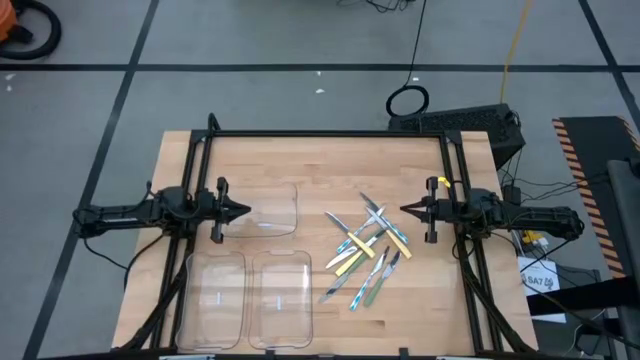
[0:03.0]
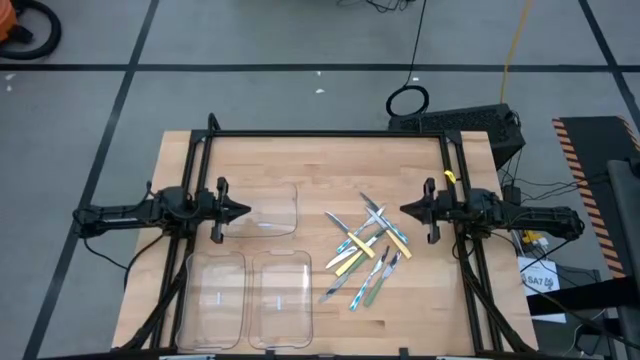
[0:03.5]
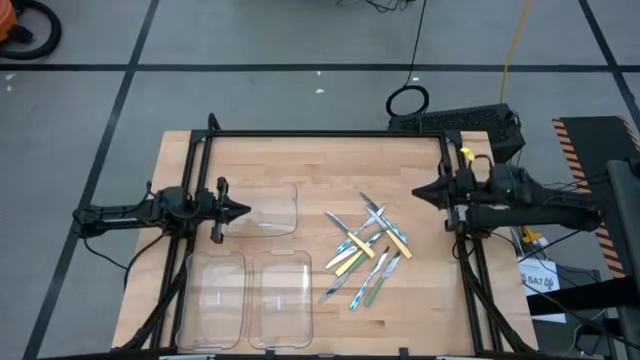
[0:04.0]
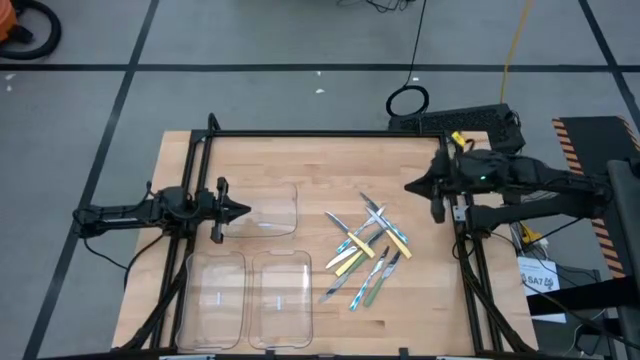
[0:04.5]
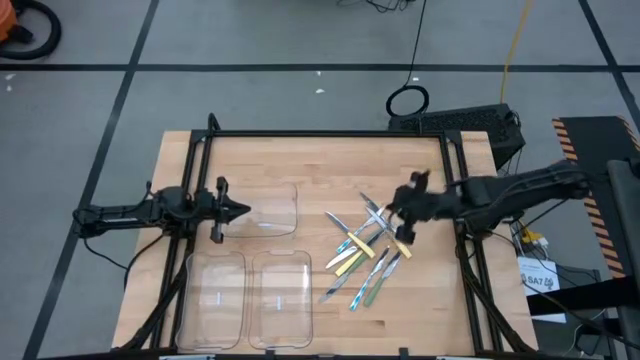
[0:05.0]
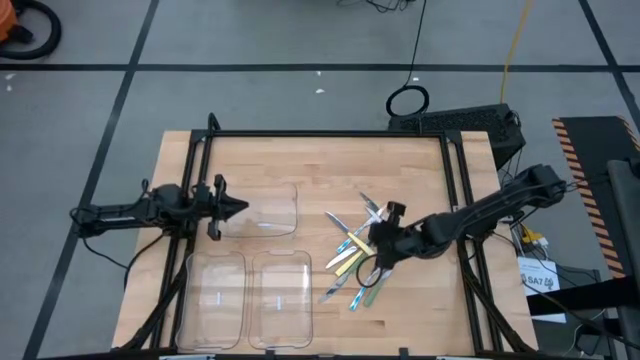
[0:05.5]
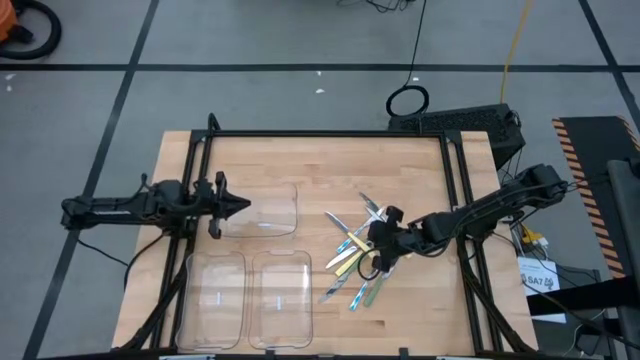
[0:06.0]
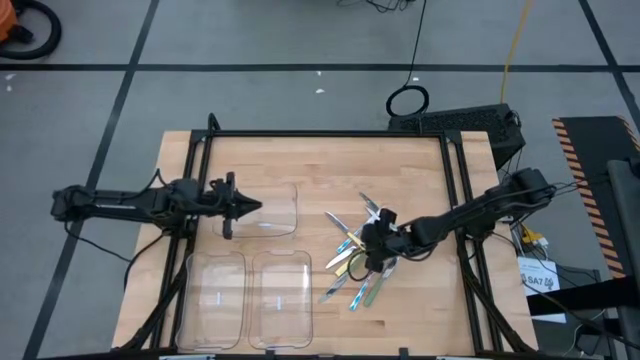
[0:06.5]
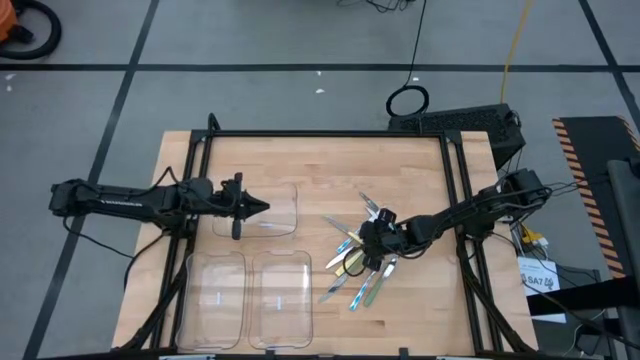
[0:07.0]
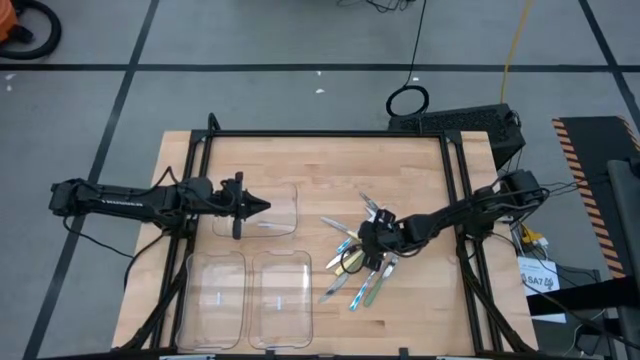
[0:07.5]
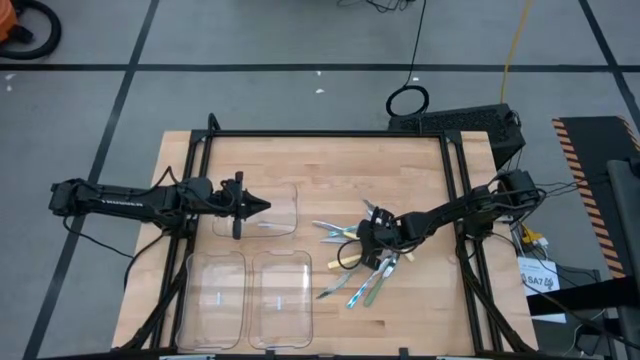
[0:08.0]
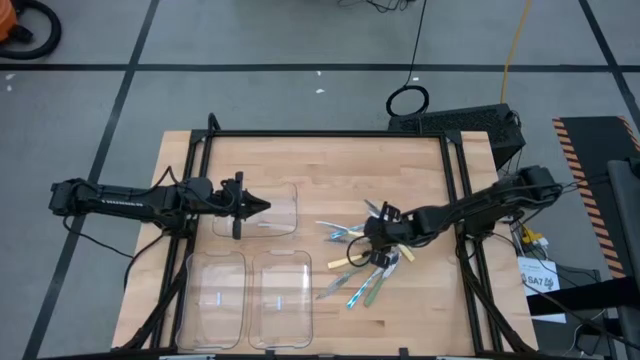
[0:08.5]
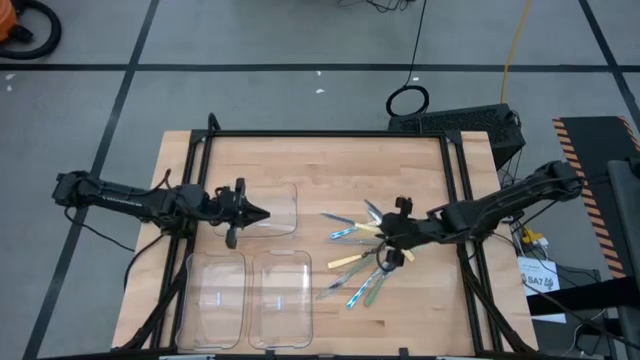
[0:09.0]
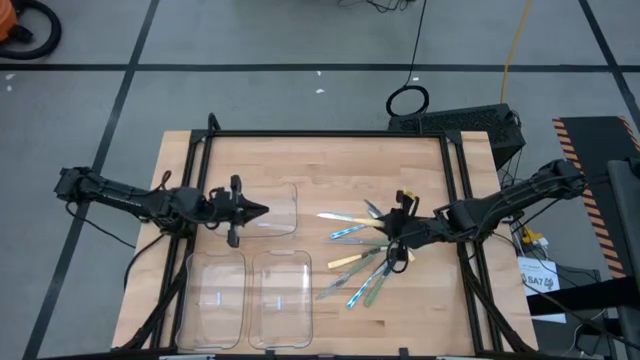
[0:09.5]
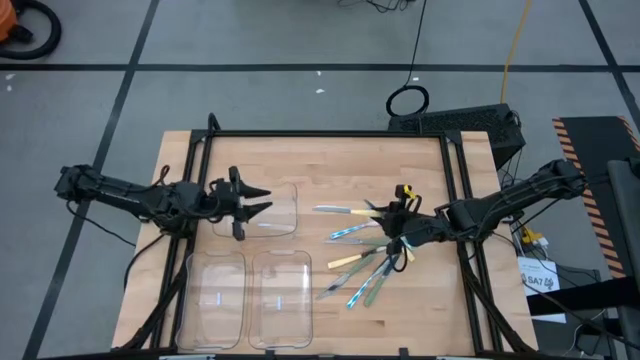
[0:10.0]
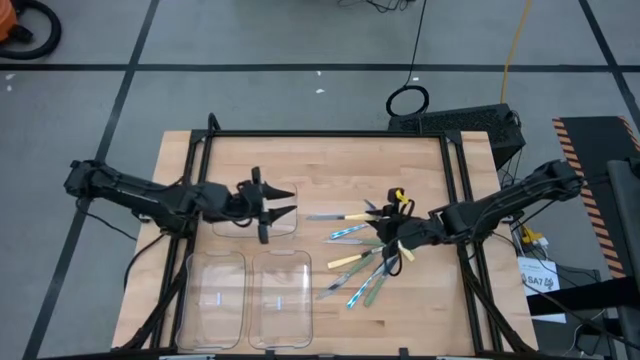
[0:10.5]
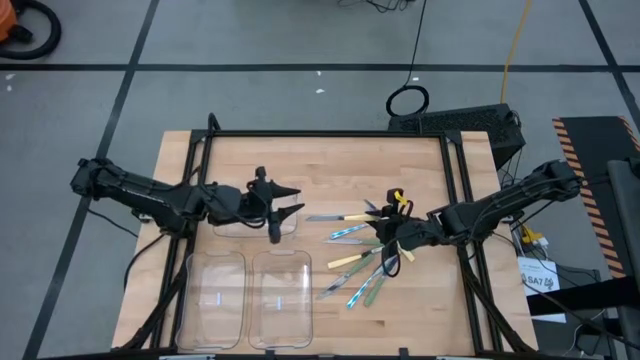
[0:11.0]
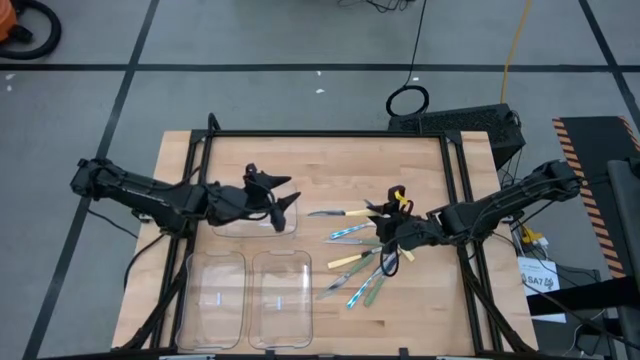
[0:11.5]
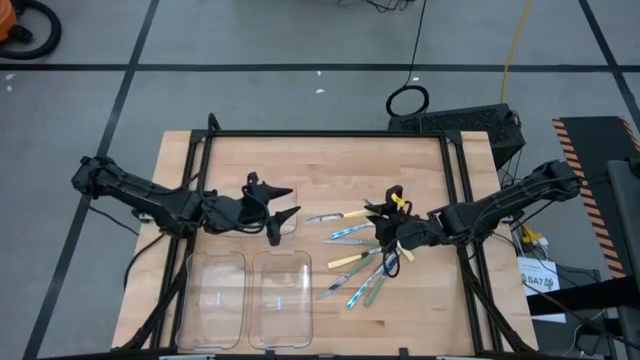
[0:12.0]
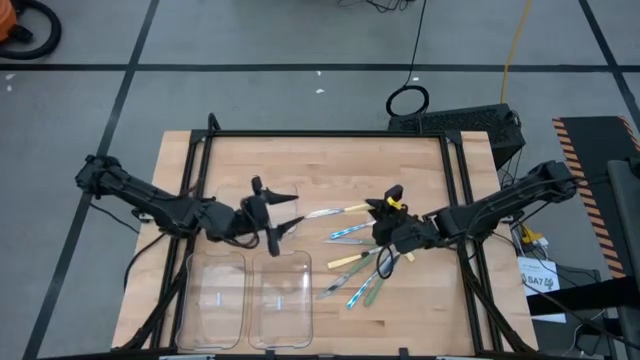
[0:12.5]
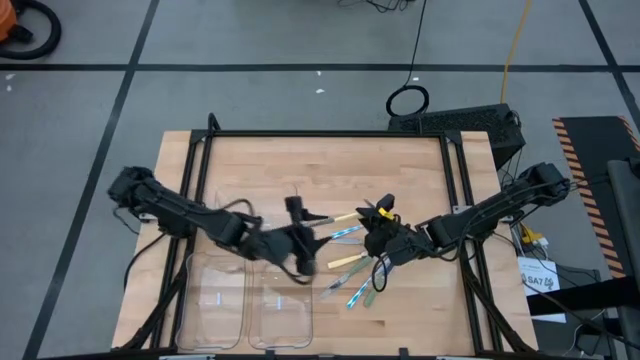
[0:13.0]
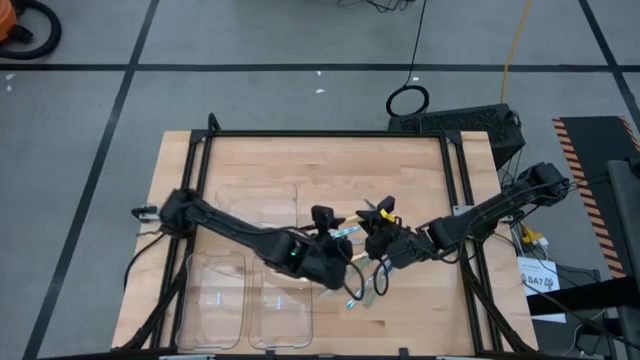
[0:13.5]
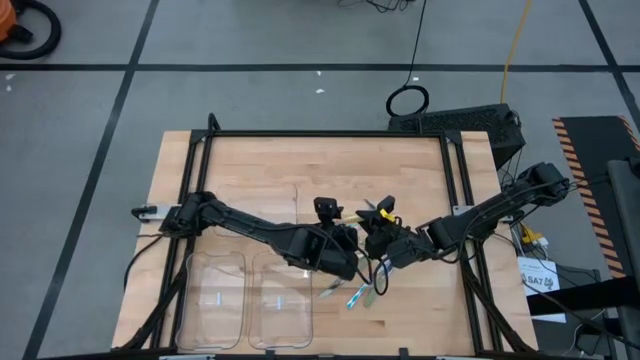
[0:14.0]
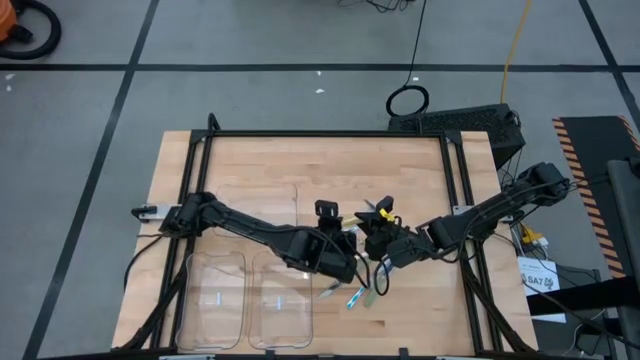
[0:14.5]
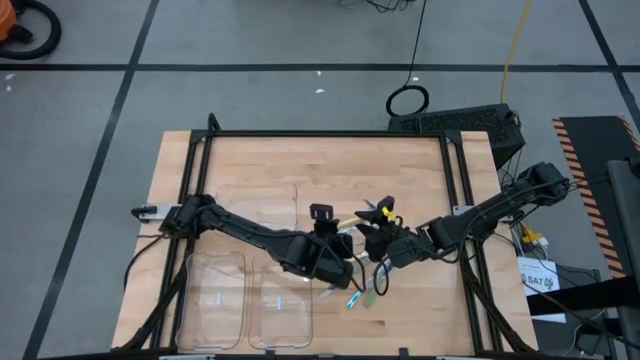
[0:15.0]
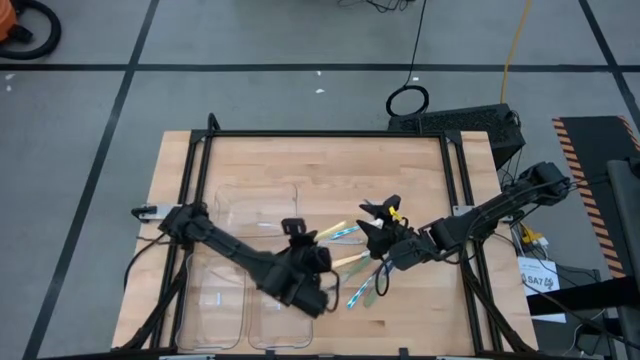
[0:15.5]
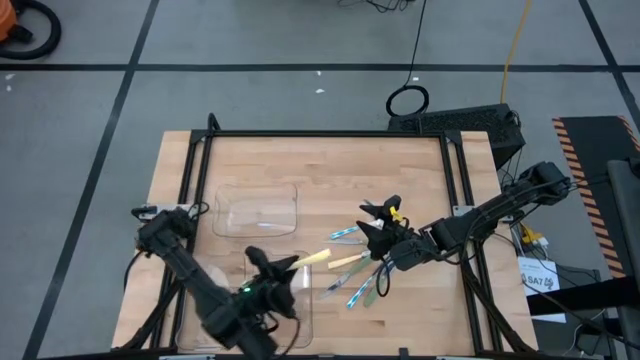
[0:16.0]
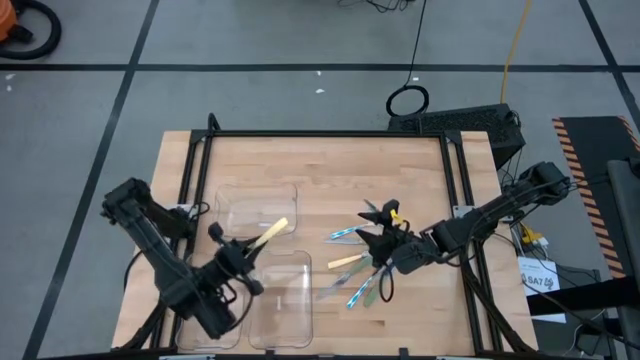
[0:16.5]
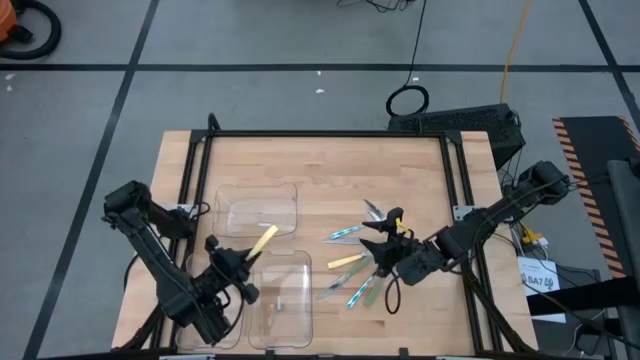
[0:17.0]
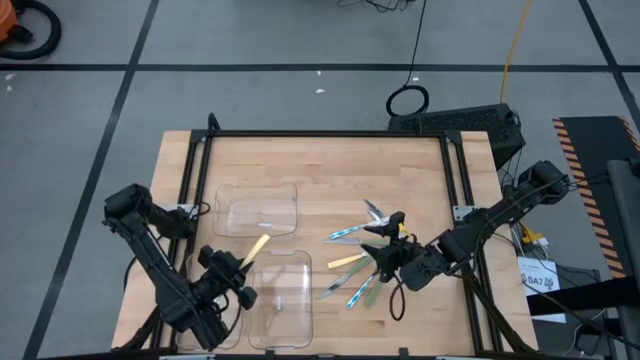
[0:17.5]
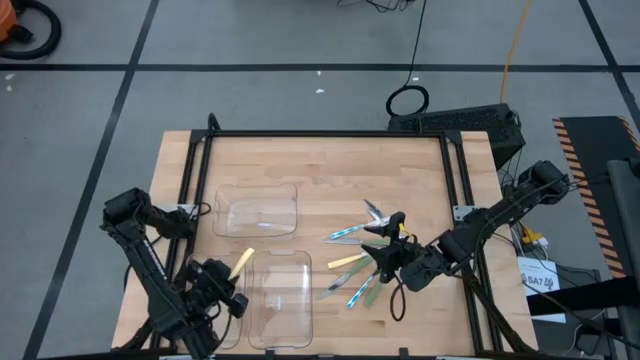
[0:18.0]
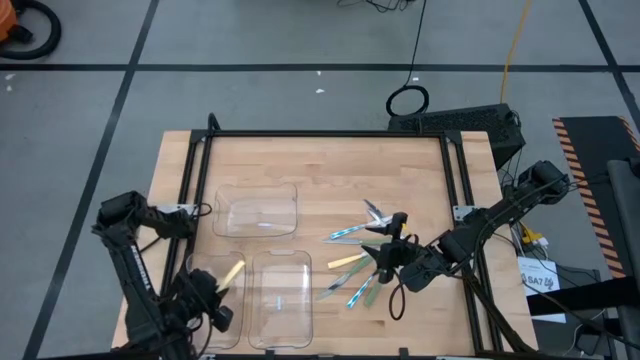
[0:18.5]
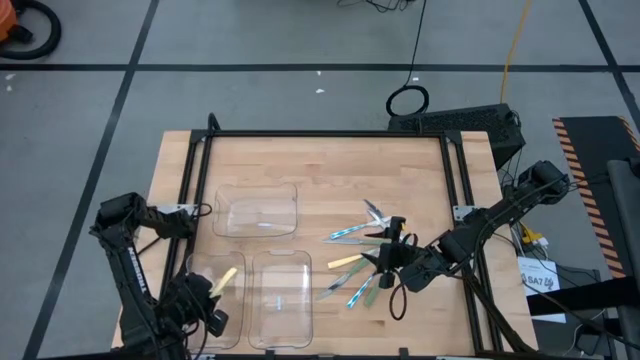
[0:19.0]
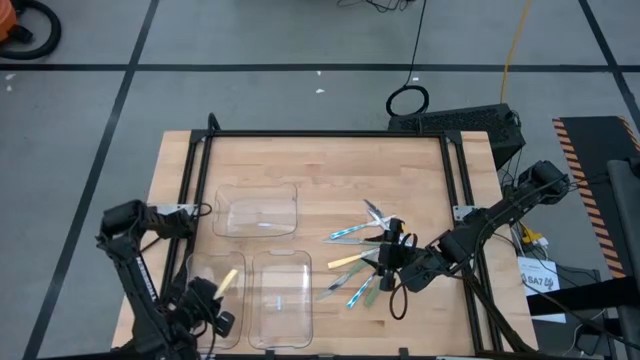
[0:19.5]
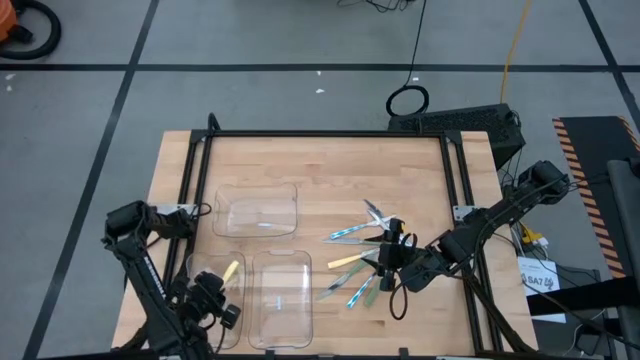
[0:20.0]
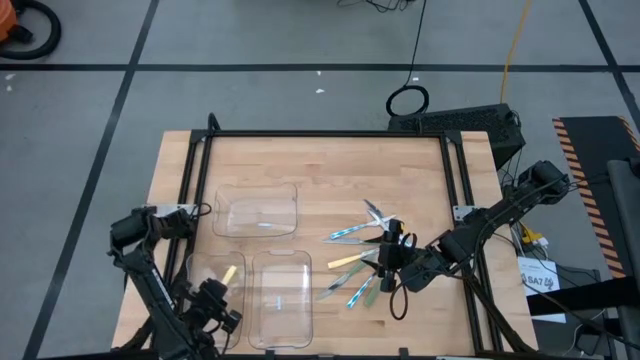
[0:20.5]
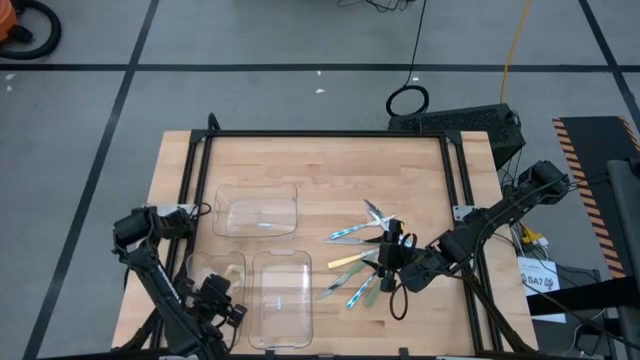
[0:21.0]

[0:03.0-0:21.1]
Task: Sort silverware by color (type)
Put the top left yellow table knife into the bottom left transparent bin
